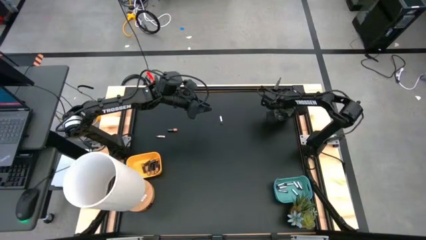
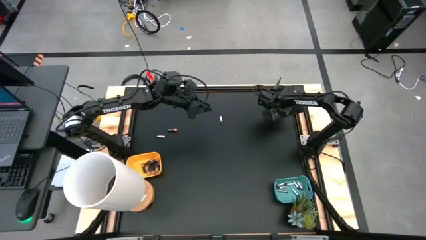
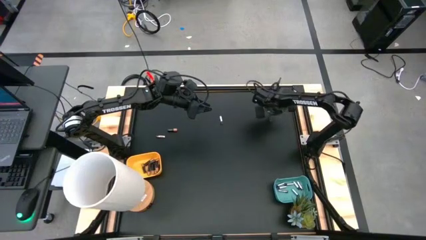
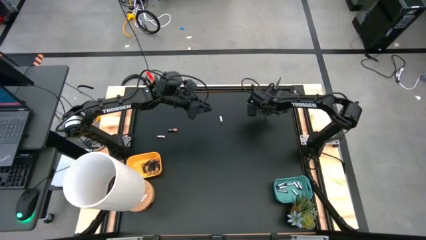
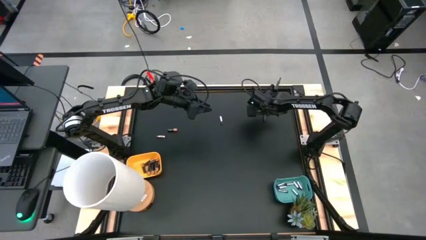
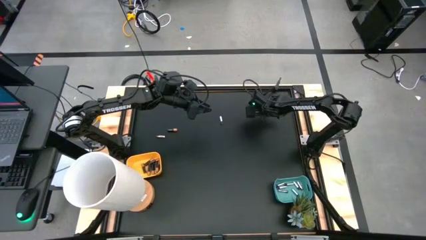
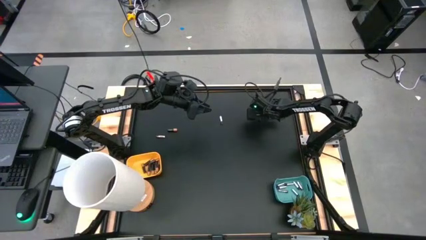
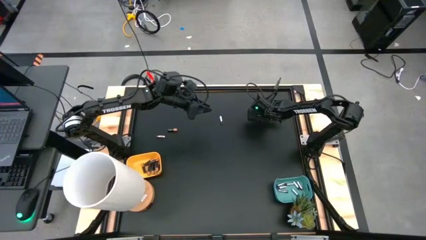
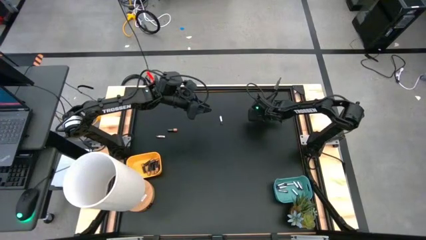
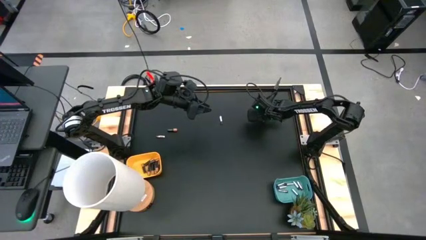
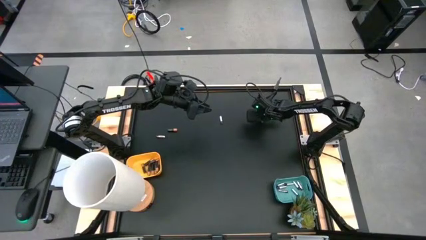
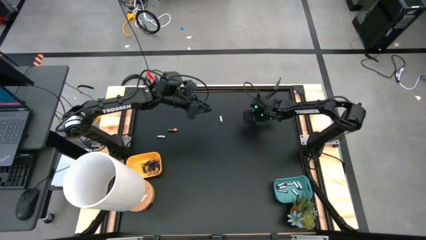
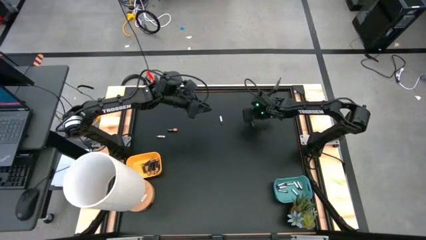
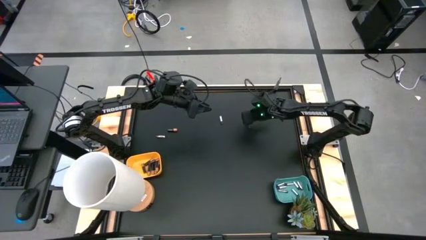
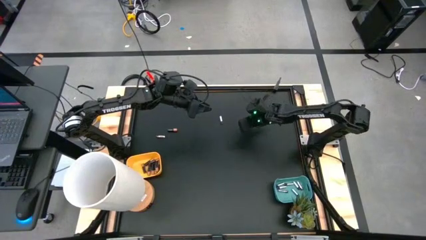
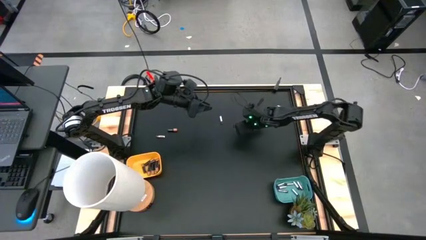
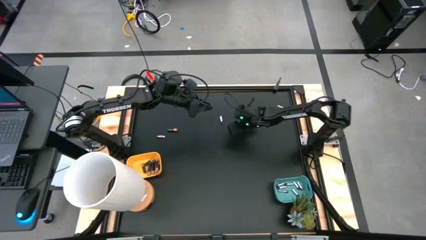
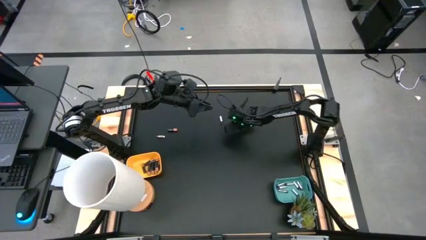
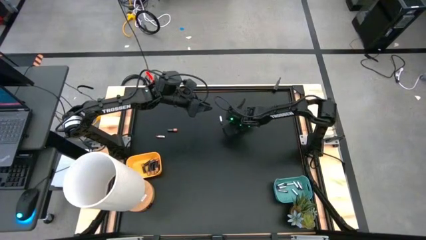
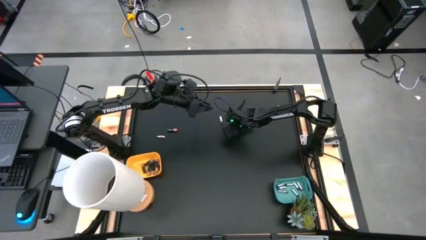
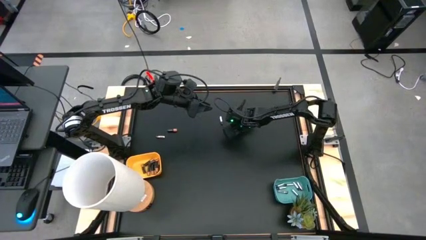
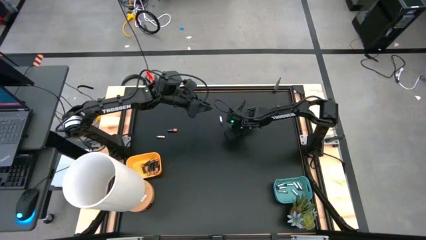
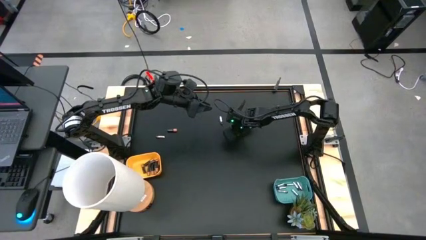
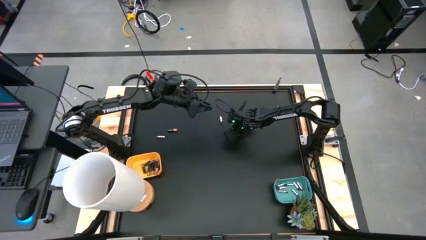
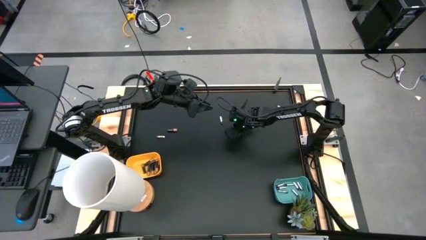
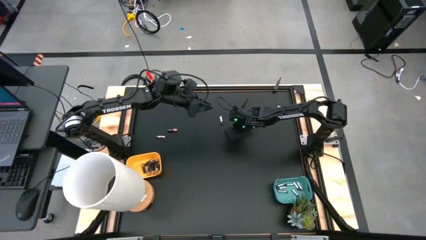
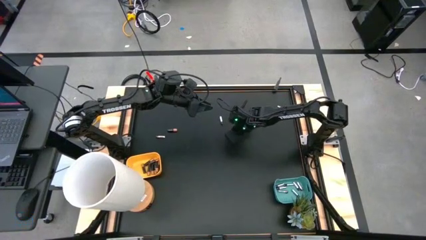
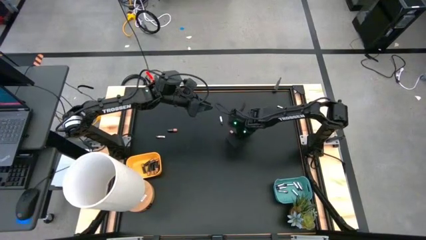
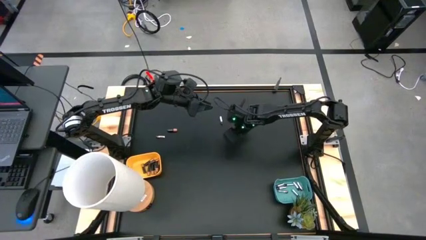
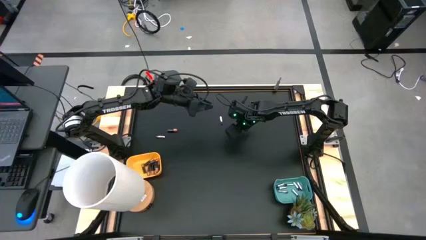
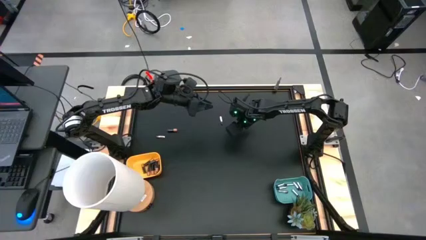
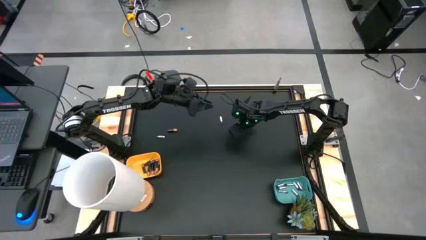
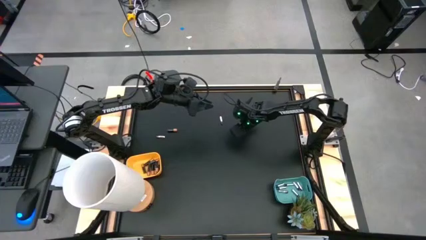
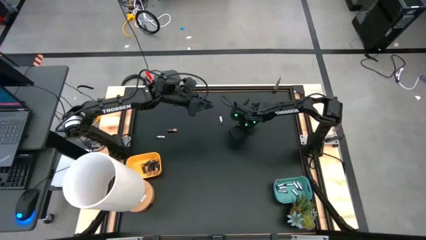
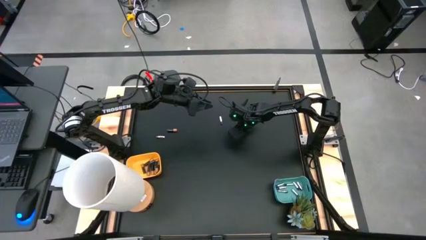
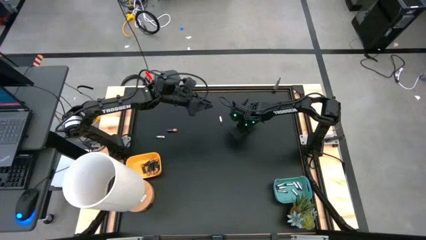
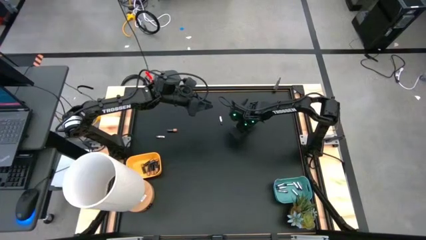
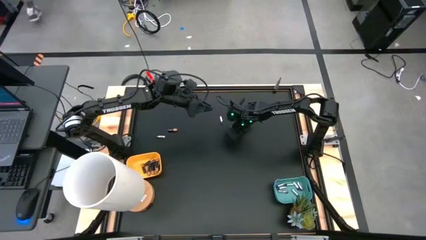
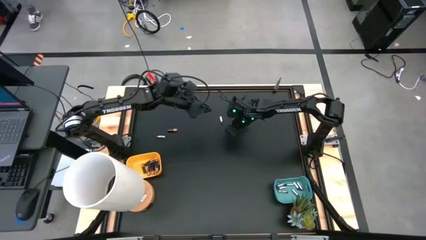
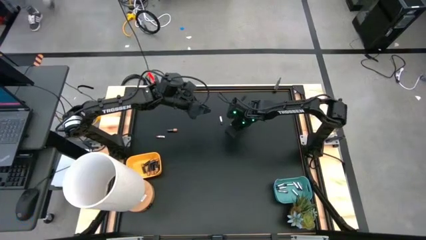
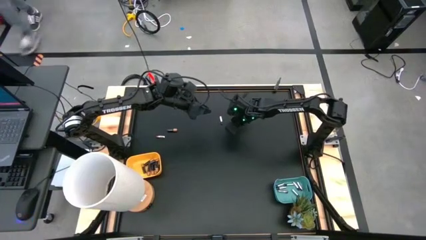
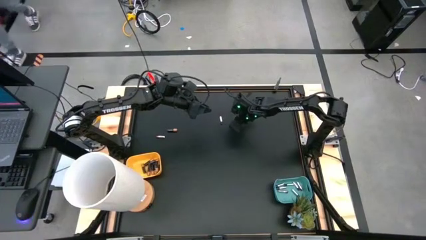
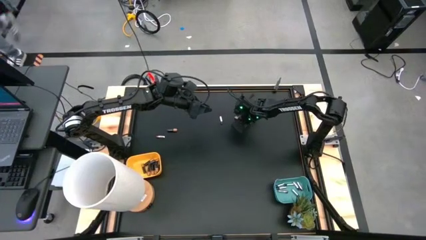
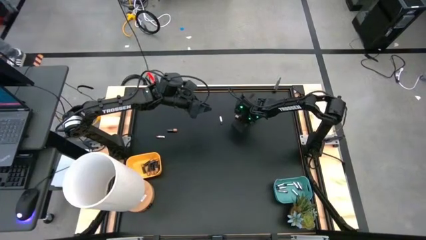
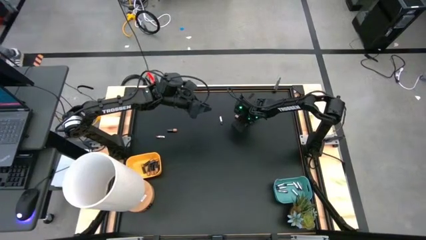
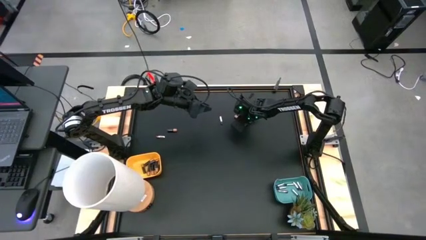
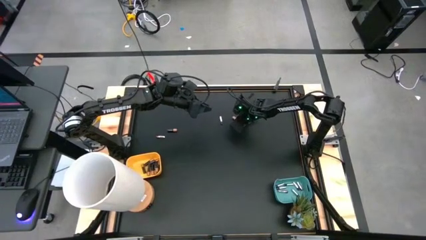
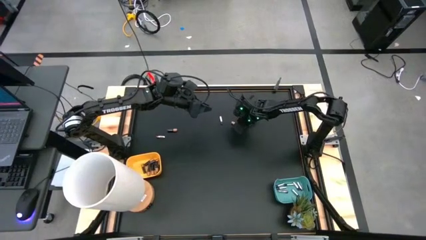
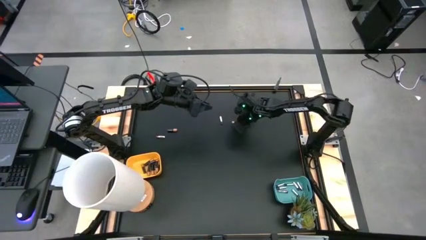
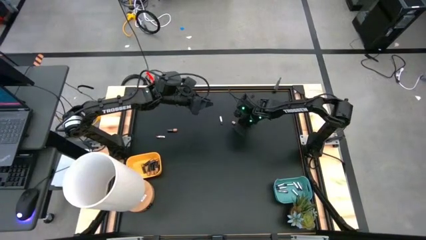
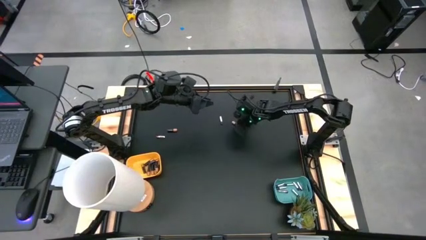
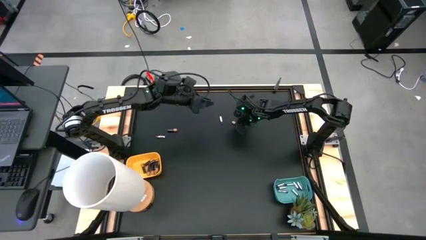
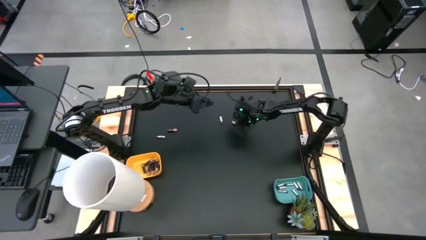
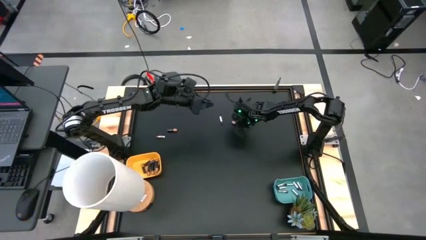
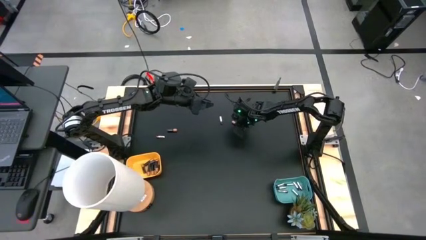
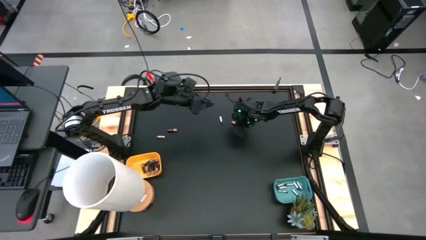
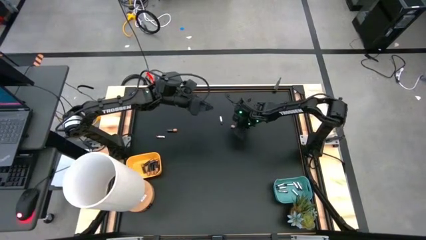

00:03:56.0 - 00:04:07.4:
Task: Sort batteries
Put the black battery into the yellow bin

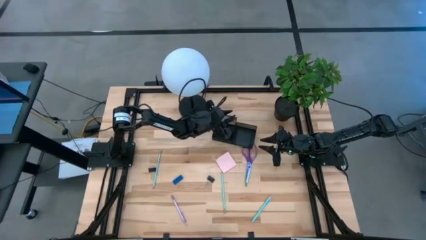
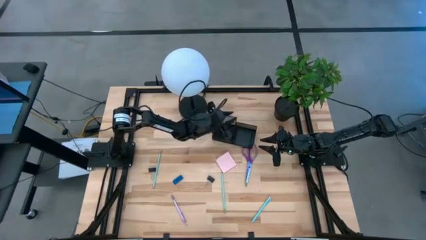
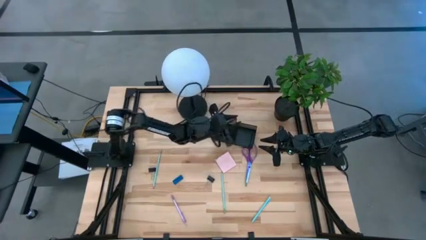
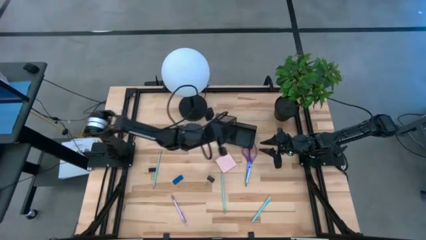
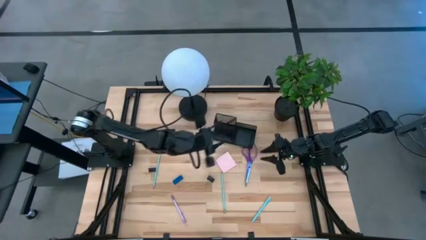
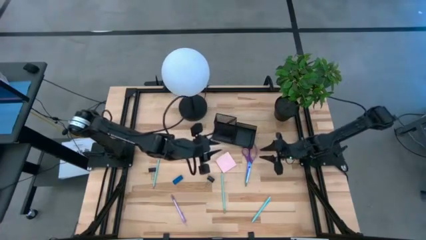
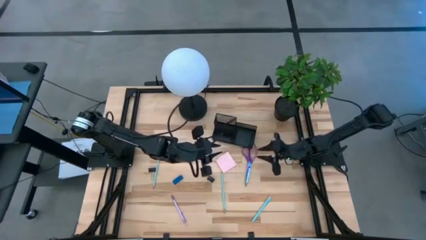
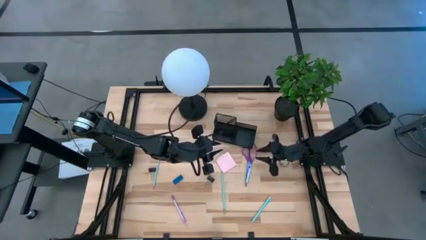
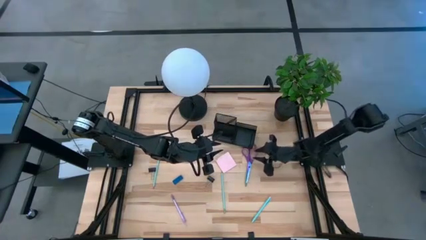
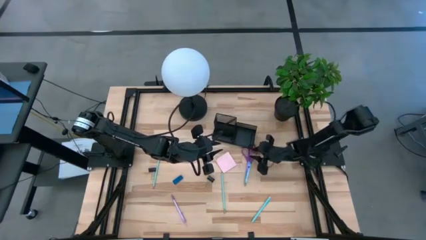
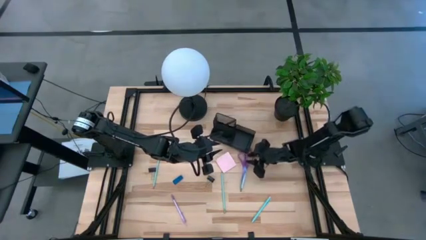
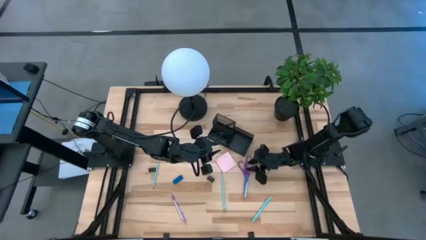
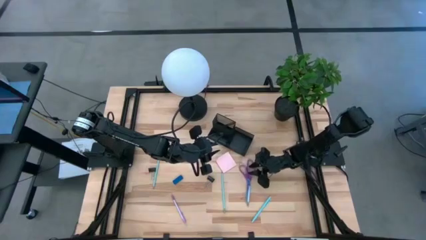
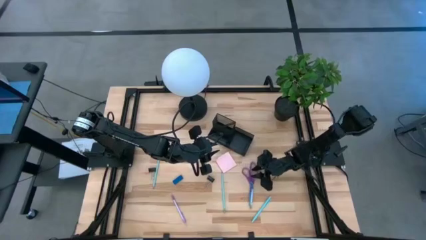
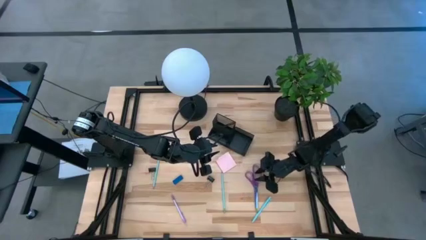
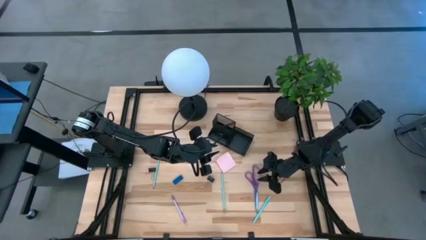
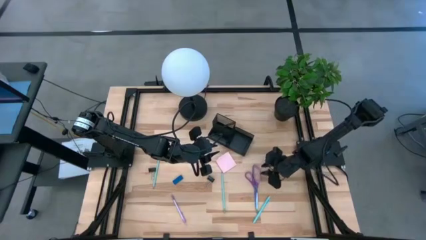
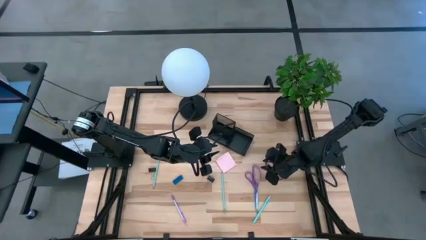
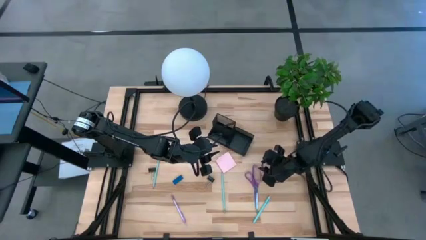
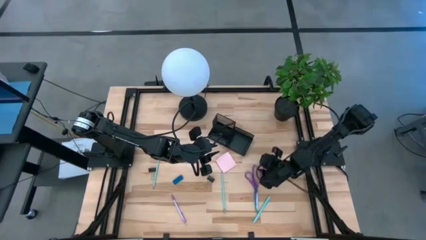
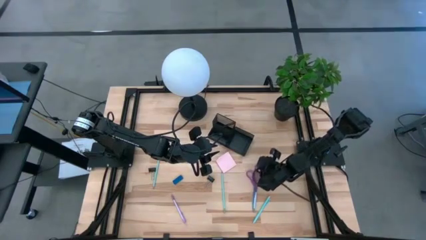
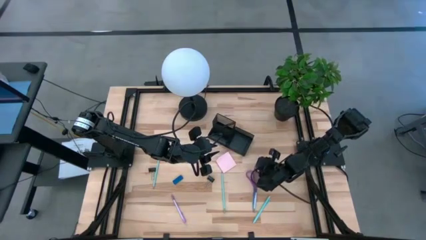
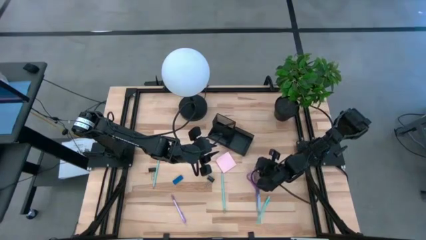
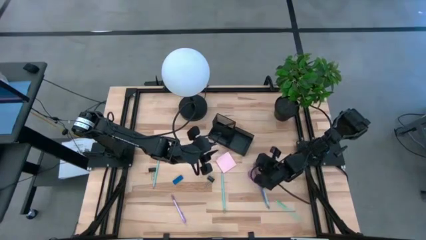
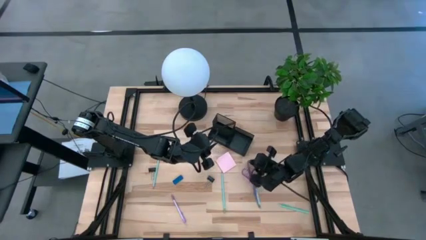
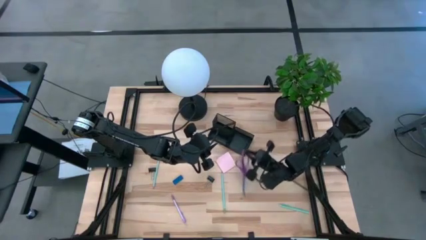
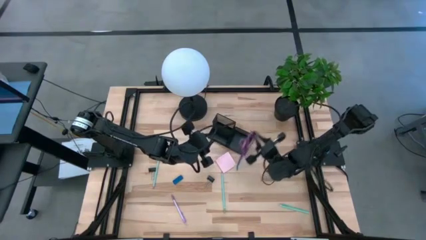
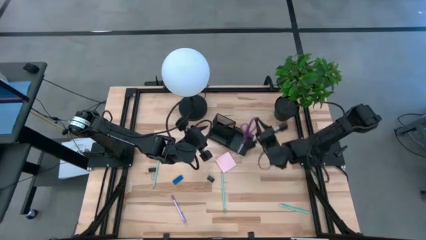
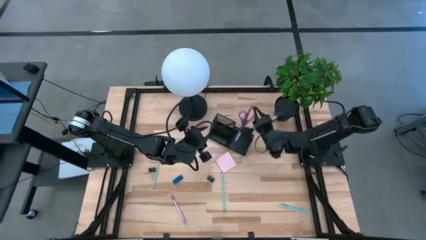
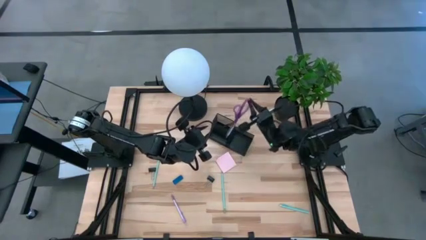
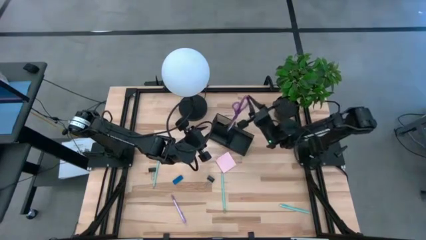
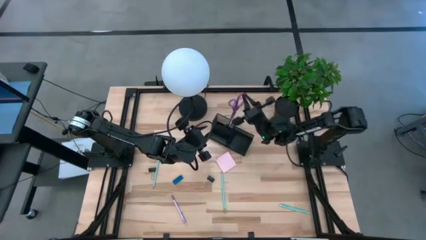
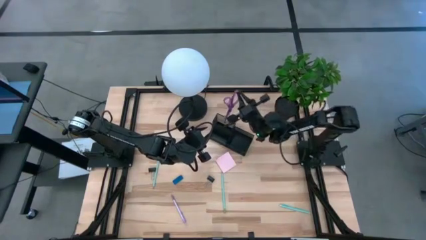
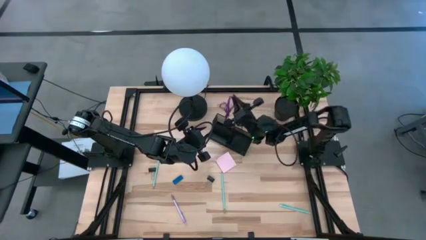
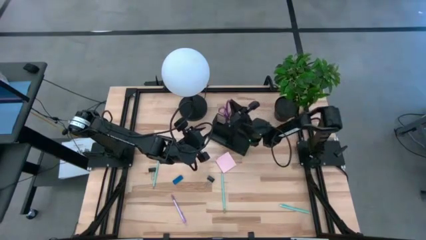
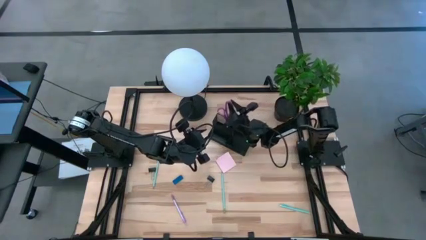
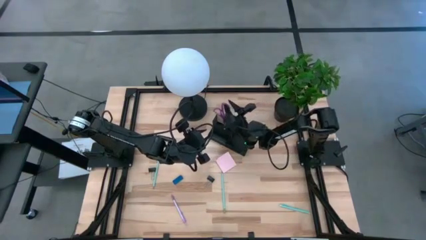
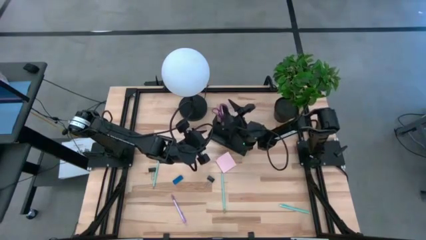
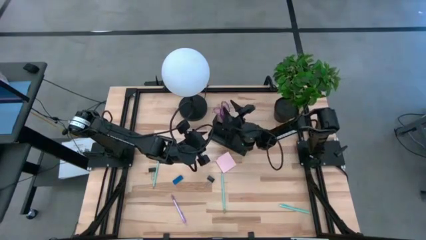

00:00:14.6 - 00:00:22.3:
Task: Pick and place office supplies into organizer
Put the violet scissors into the desk organizer
